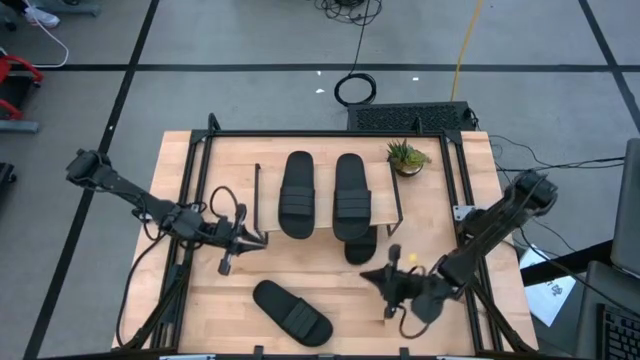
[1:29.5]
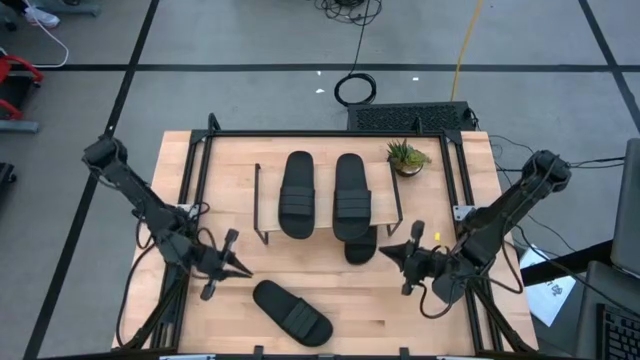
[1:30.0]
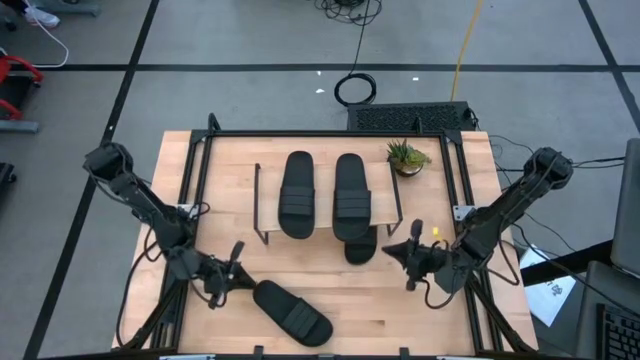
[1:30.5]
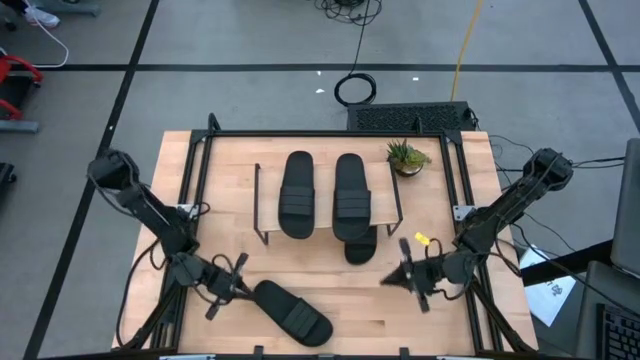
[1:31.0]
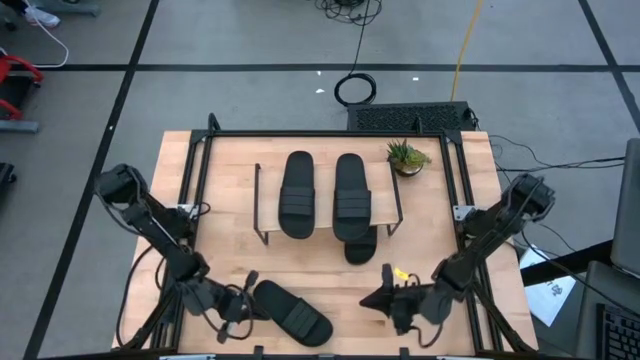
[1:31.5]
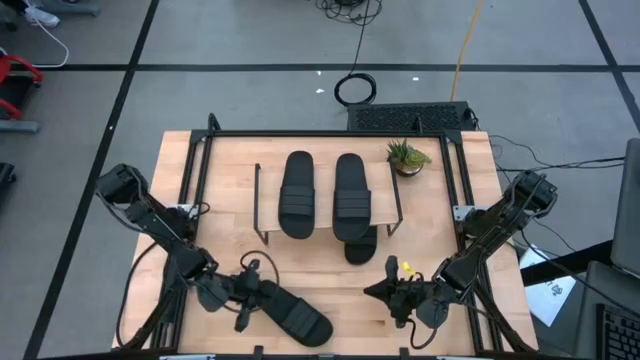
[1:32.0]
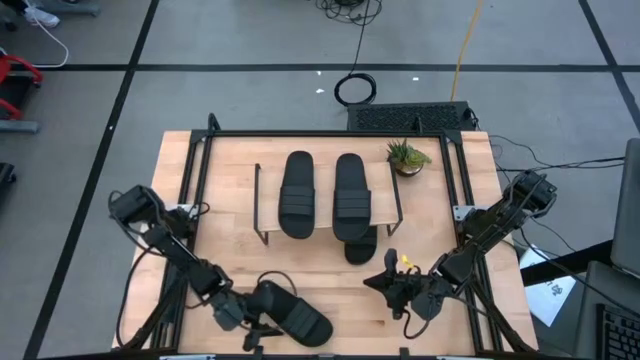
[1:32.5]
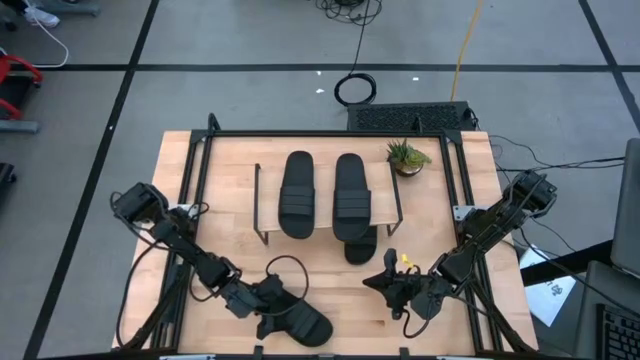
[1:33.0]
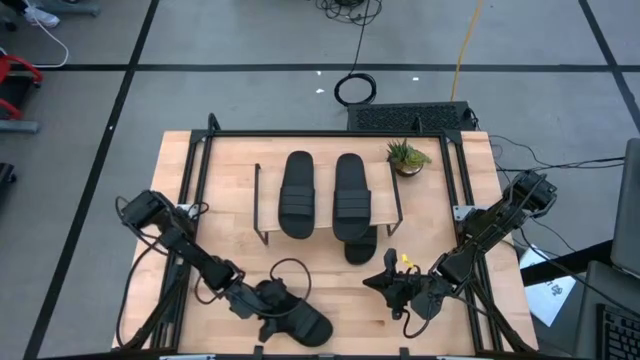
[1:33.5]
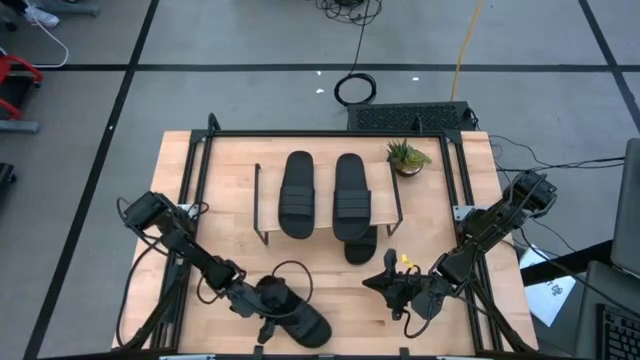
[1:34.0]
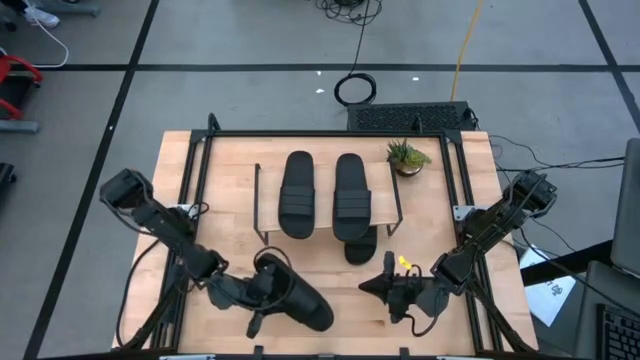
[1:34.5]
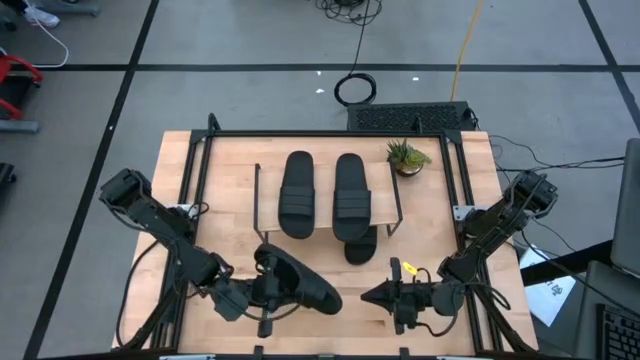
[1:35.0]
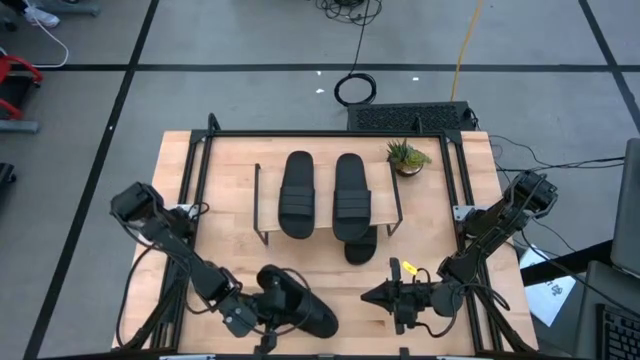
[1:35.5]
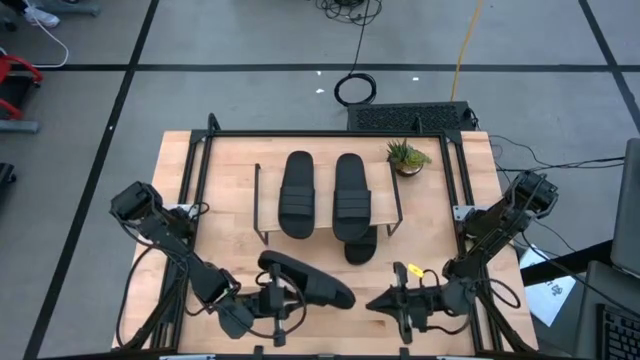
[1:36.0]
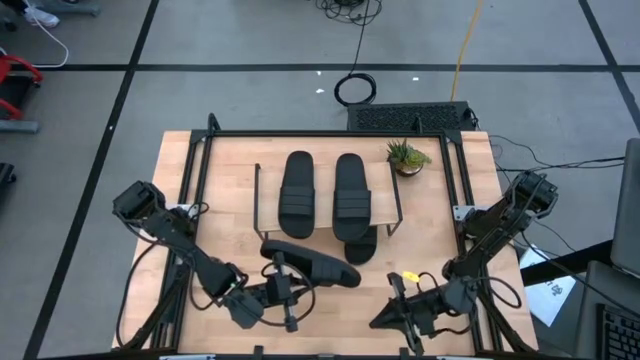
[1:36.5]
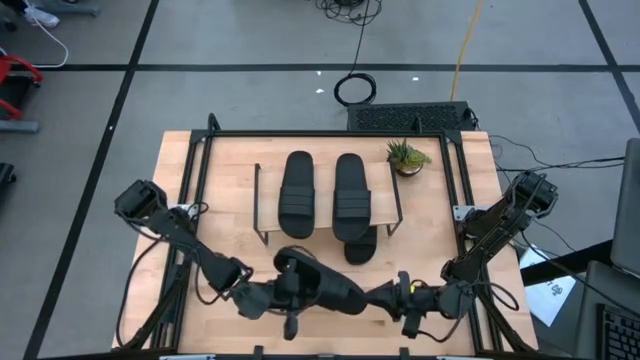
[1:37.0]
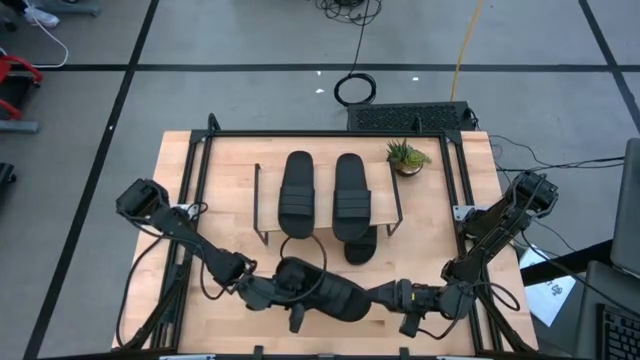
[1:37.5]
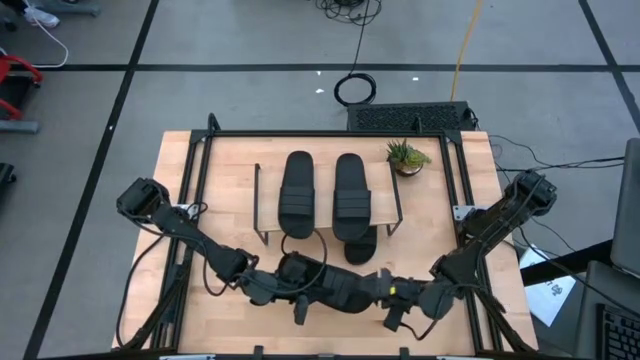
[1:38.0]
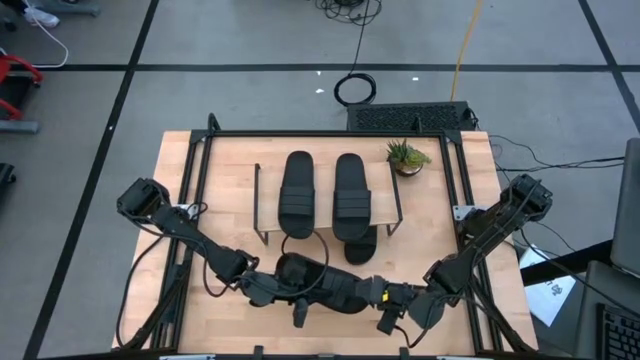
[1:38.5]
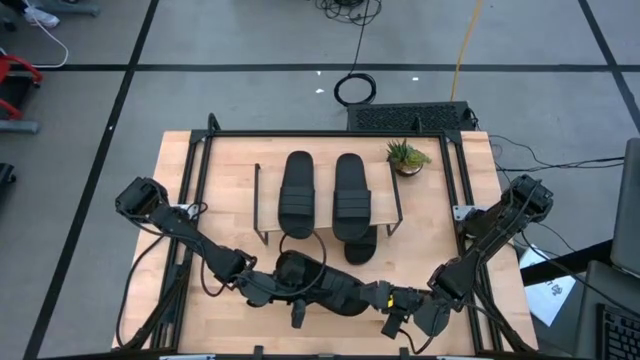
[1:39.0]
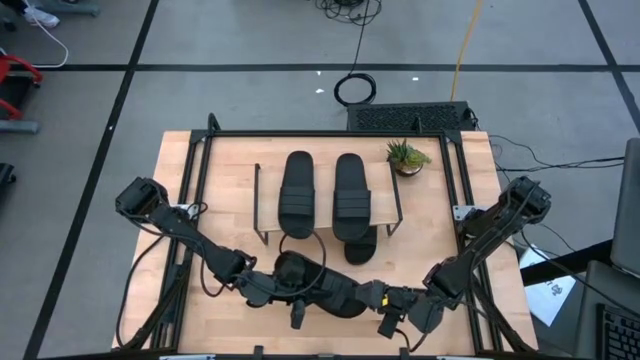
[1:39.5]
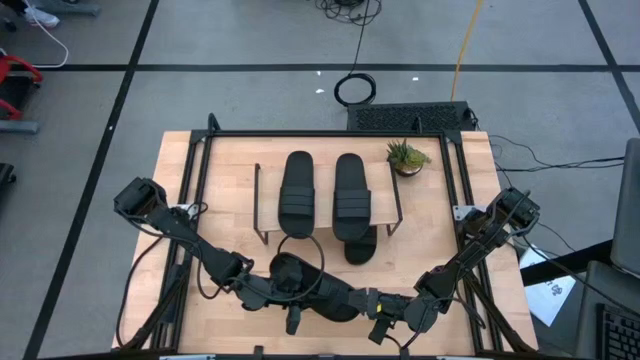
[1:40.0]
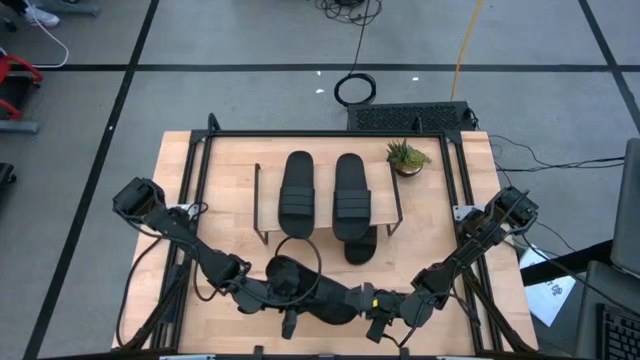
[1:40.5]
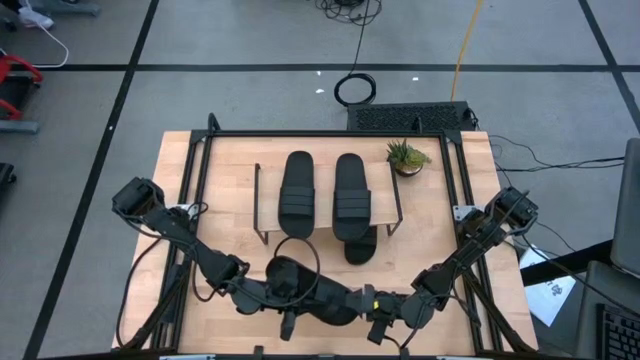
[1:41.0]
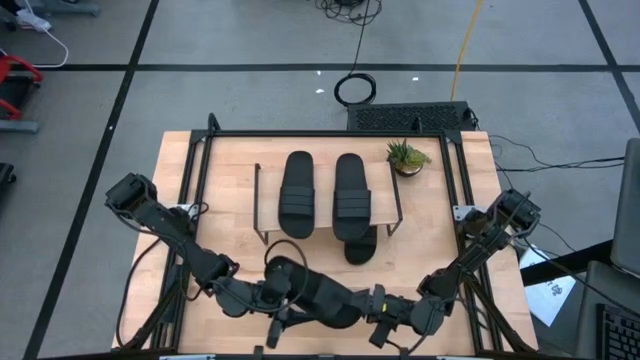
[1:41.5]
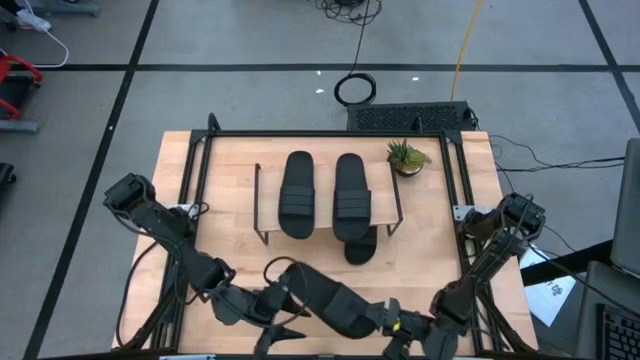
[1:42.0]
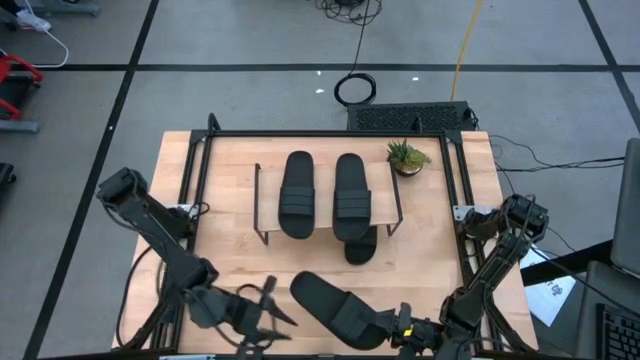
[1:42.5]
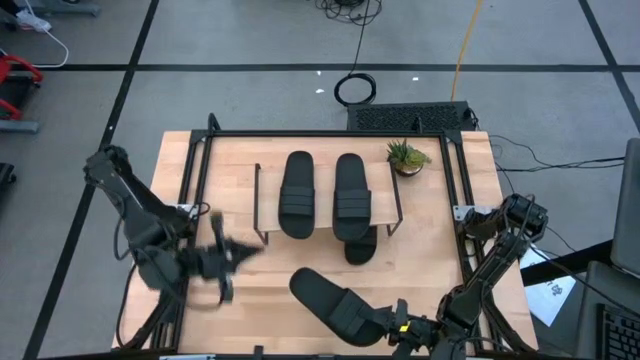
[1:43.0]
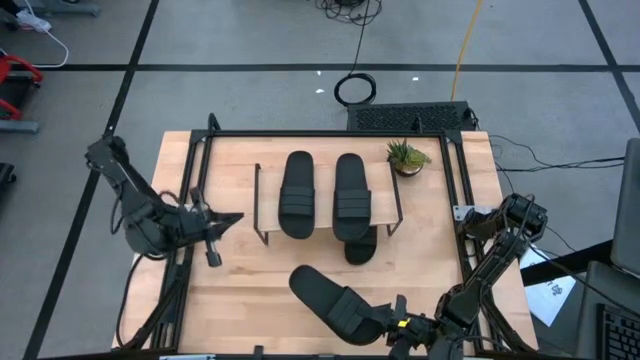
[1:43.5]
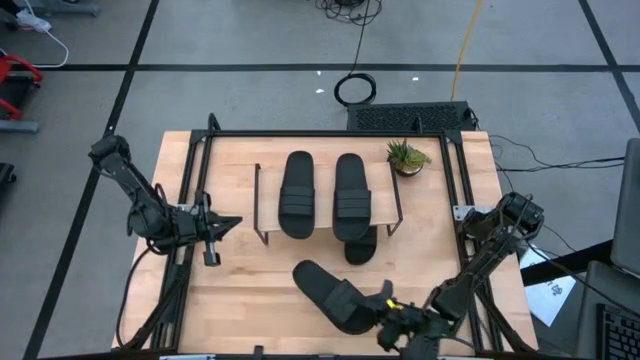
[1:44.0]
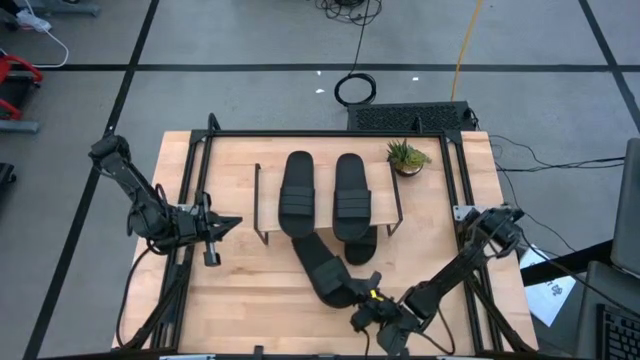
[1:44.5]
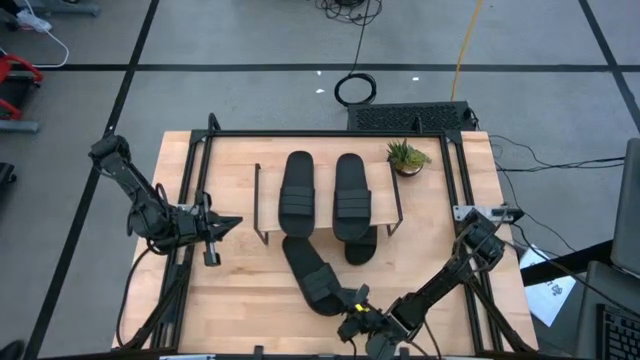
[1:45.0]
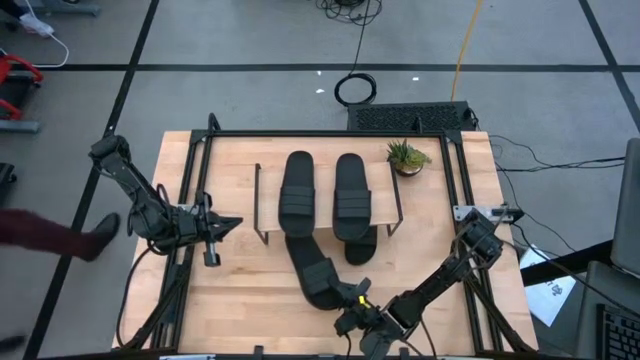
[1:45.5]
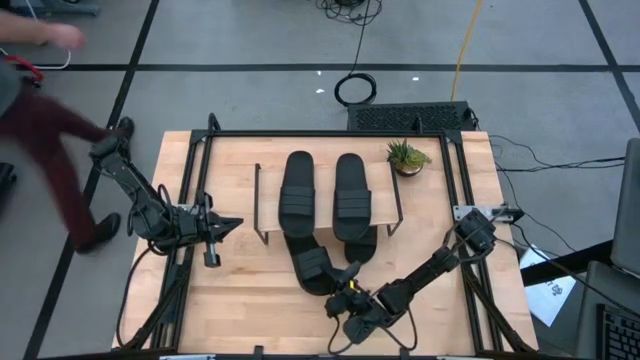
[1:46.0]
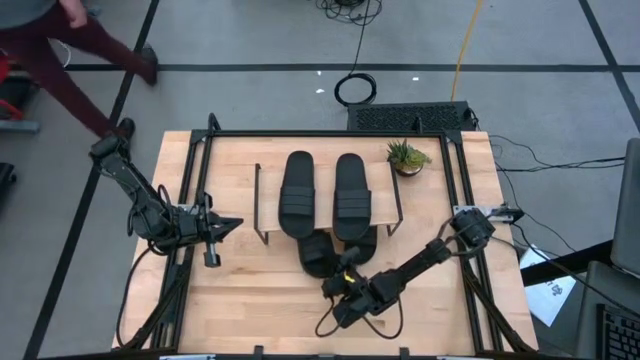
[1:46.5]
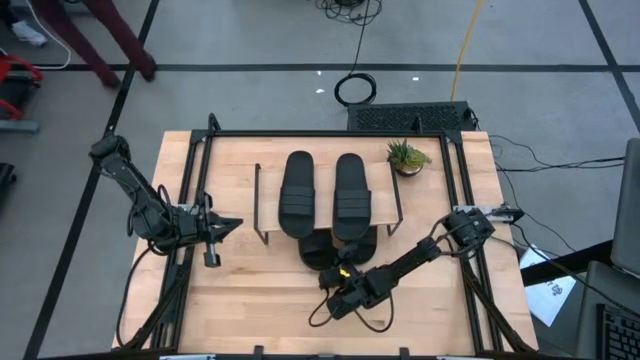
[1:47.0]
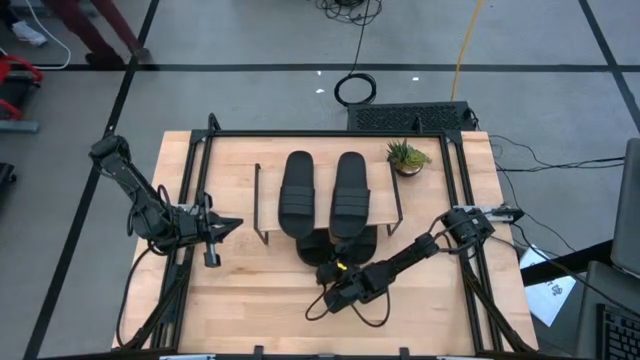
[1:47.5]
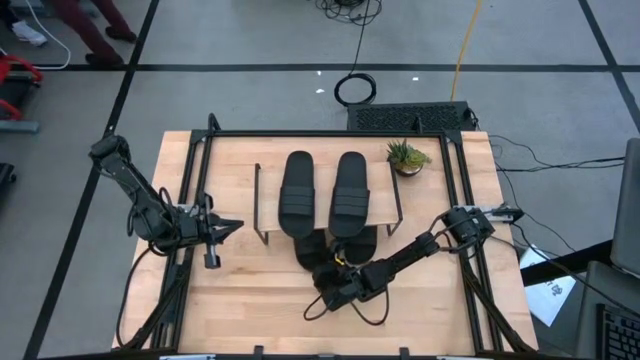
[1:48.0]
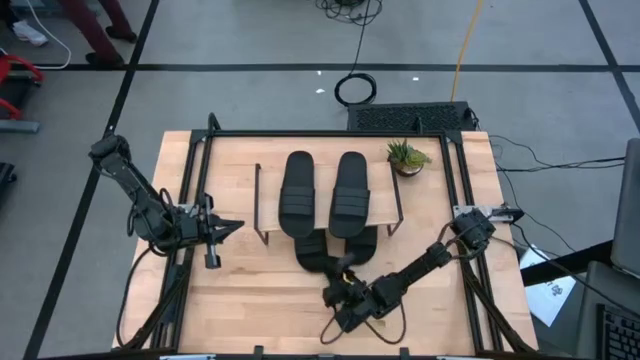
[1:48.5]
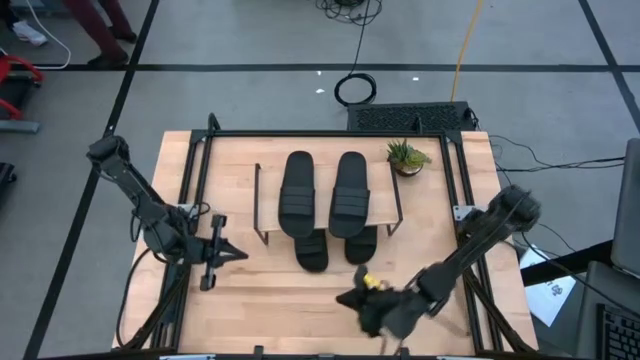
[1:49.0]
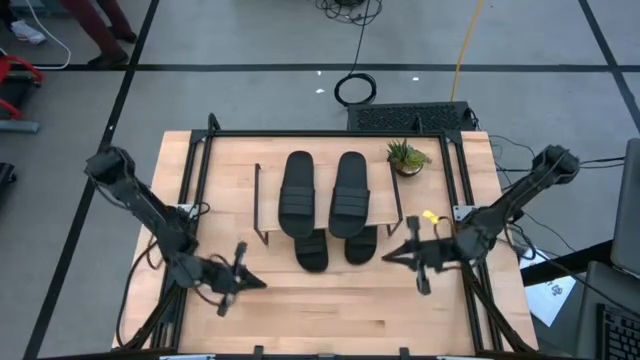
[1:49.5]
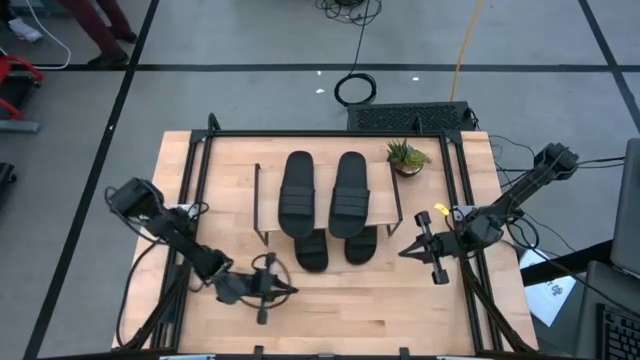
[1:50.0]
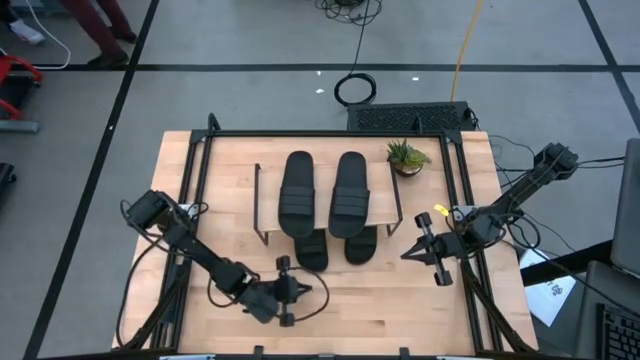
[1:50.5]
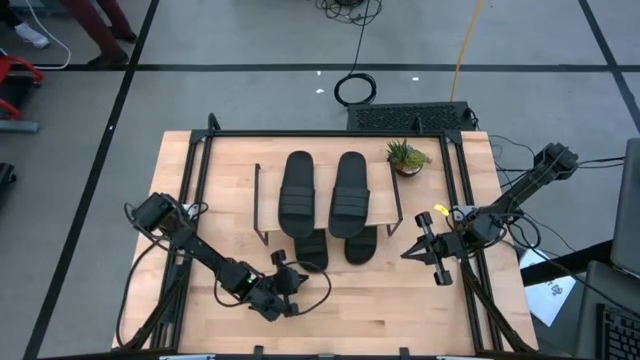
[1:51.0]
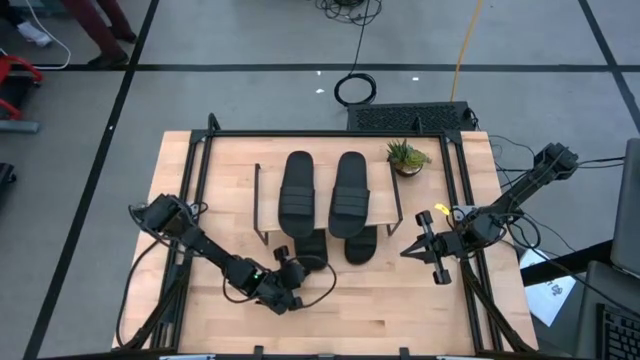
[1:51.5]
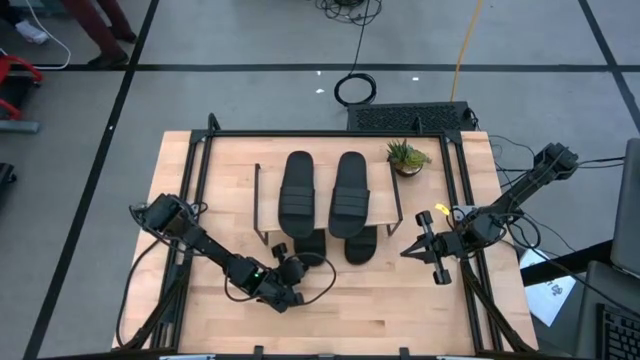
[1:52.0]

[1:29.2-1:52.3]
Task: Pick and place slides into the shelf
Put the black slide under the shelf
